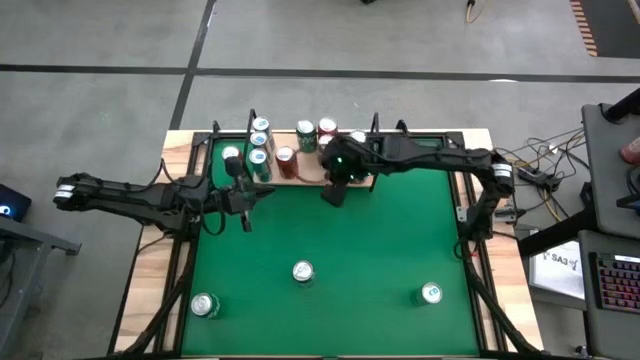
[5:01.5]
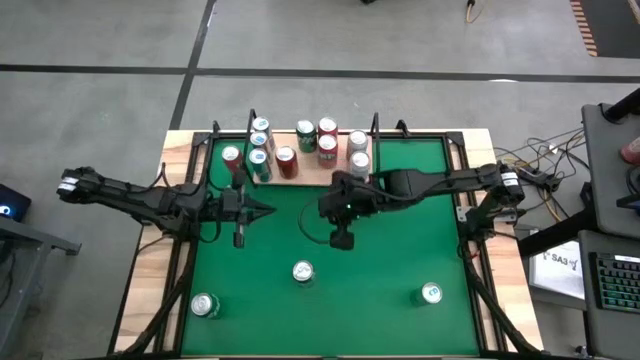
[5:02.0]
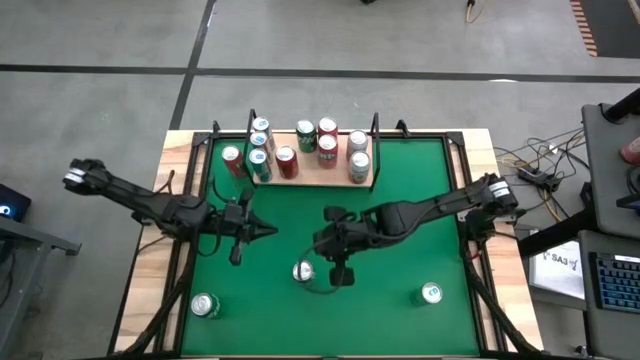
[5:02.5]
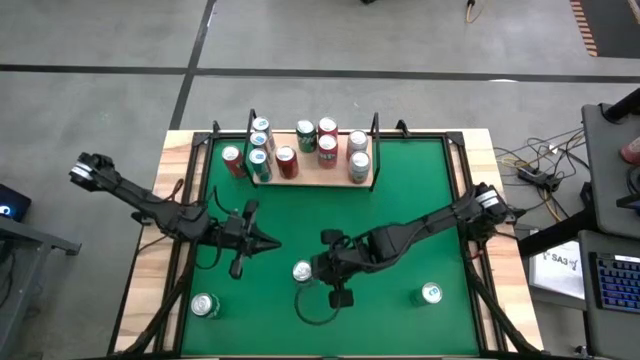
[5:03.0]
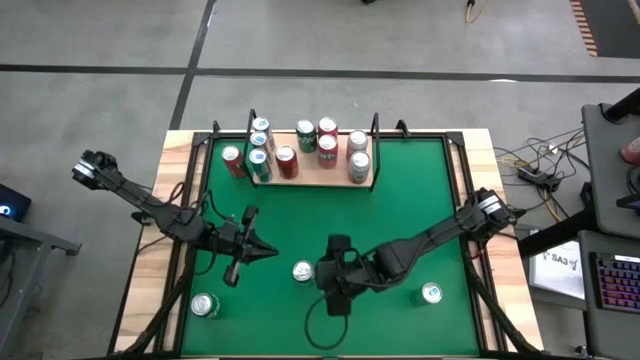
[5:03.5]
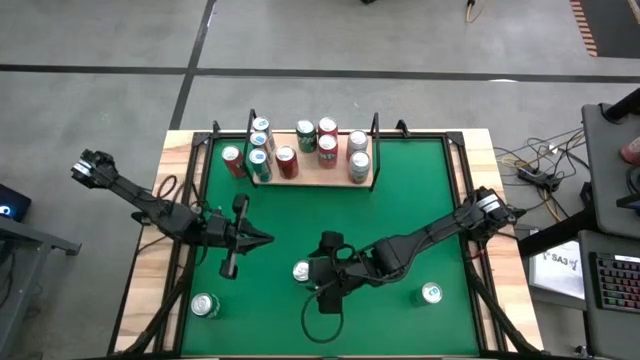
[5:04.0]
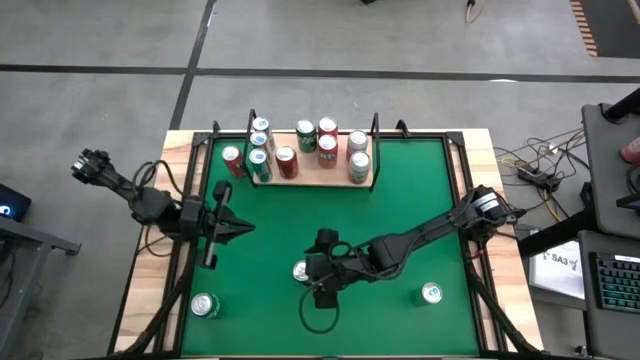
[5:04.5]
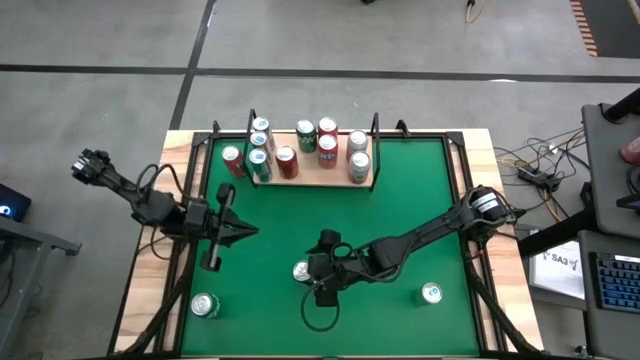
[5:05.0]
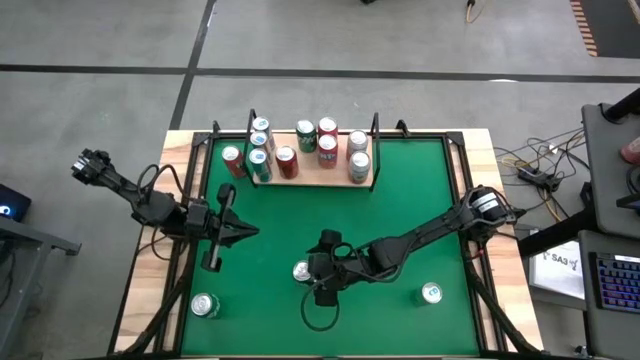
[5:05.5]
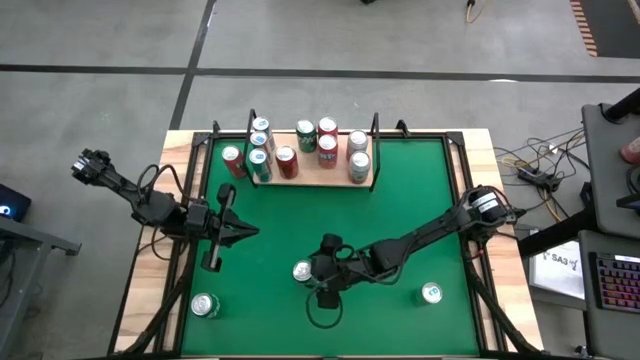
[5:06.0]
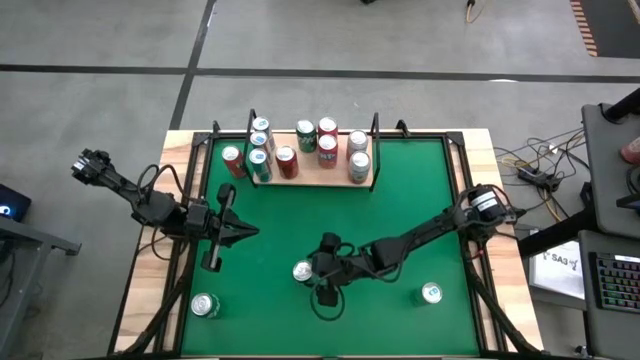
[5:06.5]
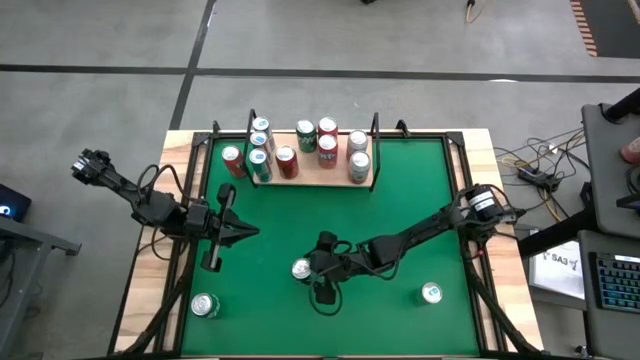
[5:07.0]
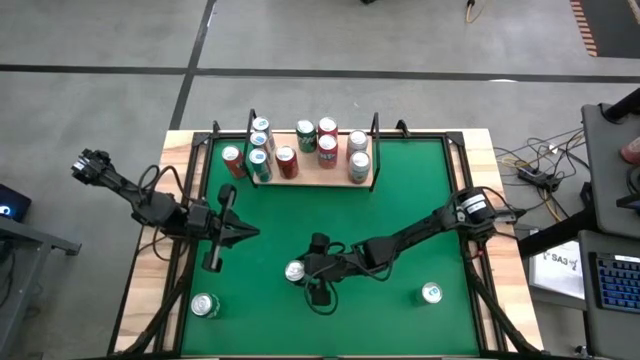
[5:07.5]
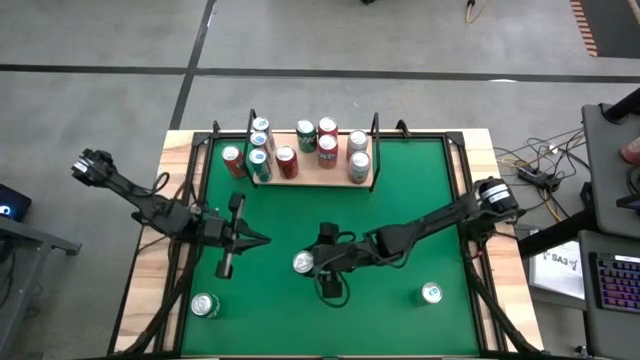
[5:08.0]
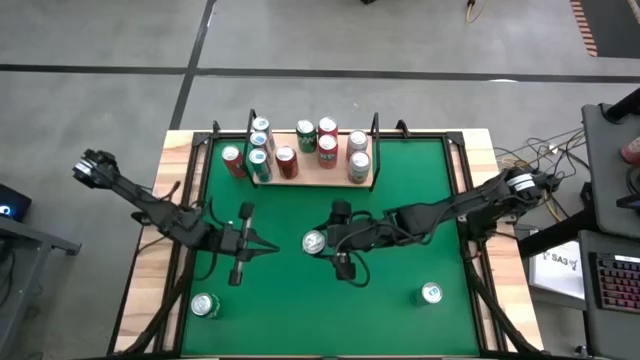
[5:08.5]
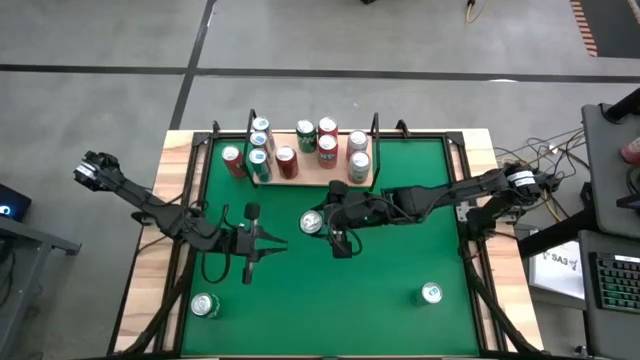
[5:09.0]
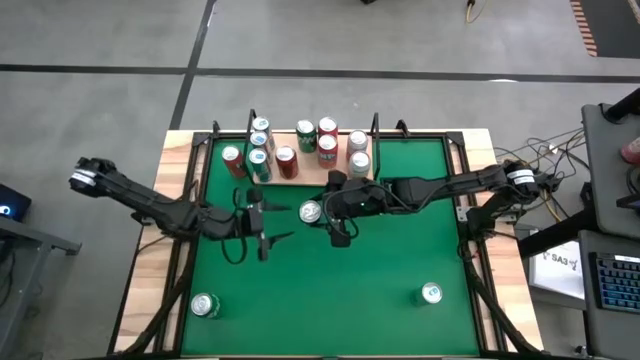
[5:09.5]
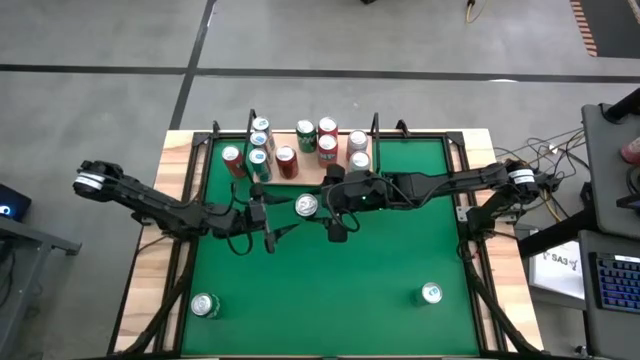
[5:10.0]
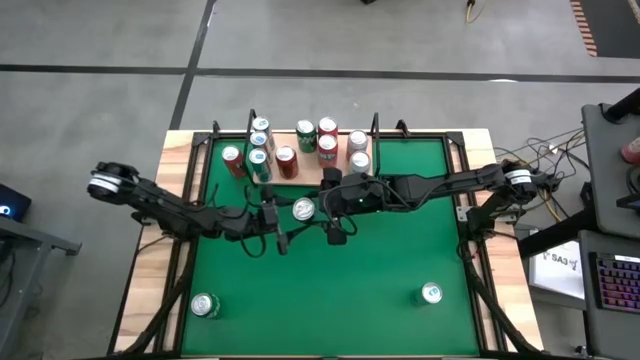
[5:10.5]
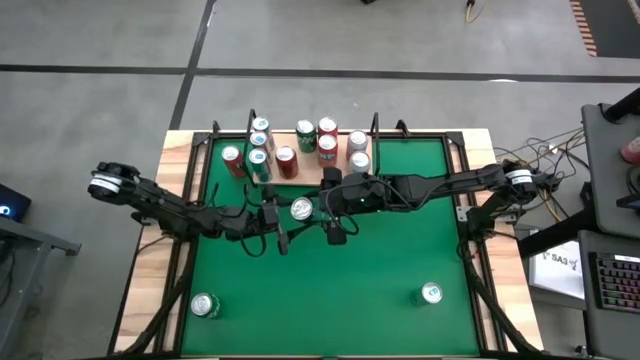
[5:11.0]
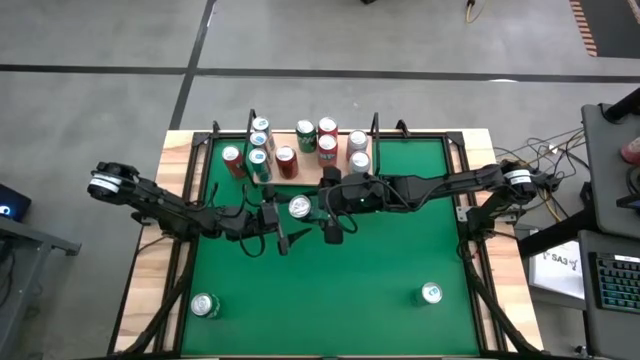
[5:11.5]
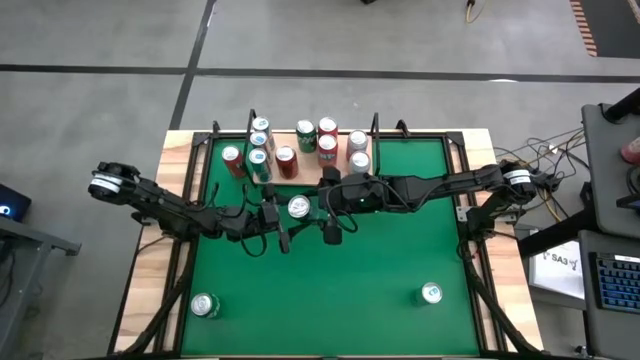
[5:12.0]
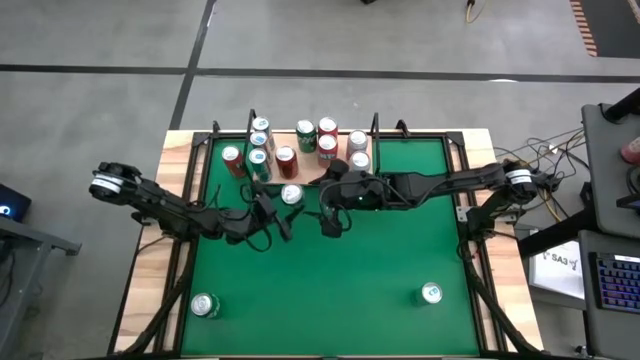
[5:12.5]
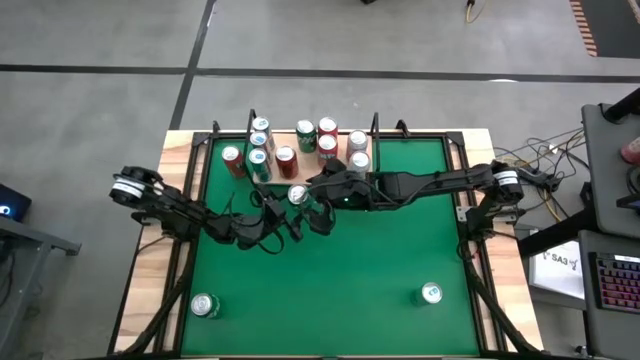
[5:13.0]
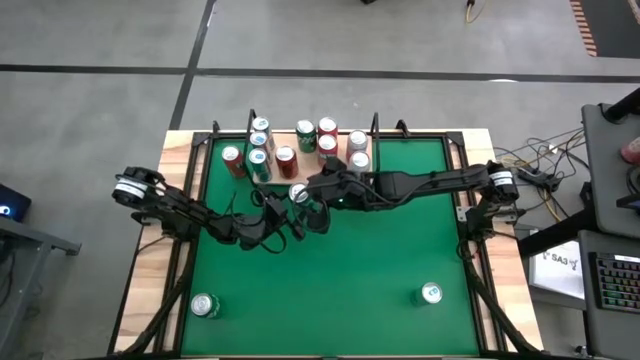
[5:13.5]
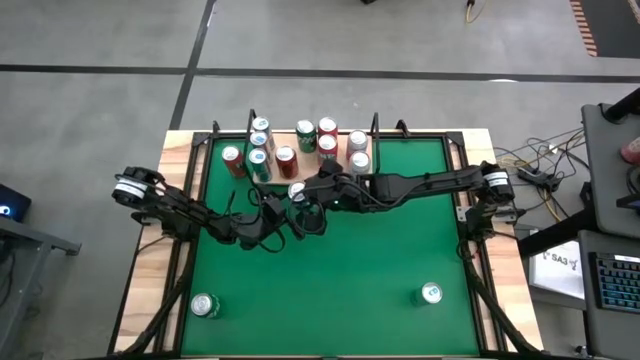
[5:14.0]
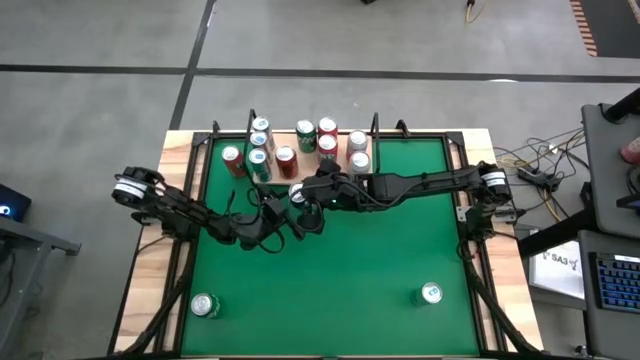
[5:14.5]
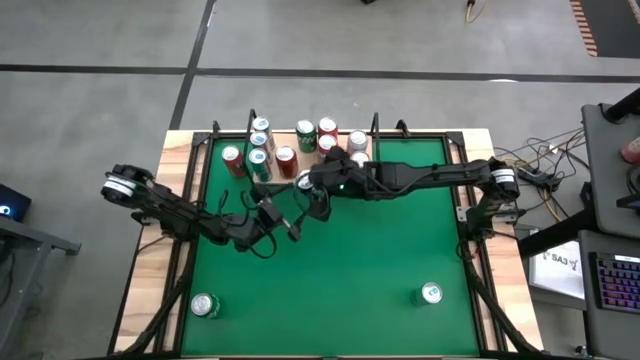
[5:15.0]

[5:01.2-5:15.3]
Task: Pick and place cans onto a shelf
Put the right green soda can on the shelf aligned with the other green soda can

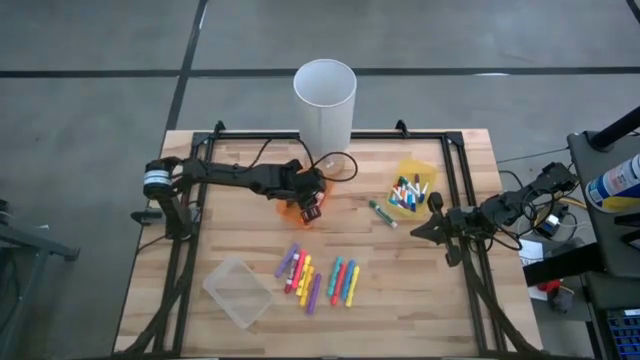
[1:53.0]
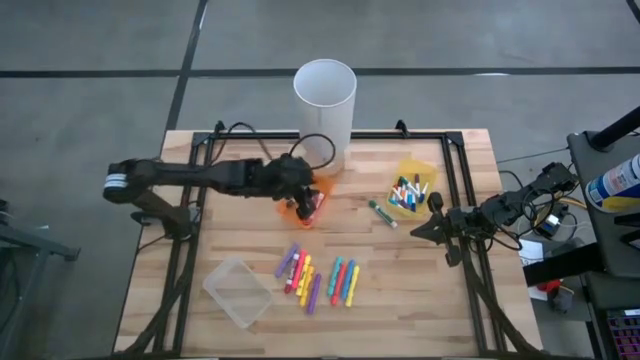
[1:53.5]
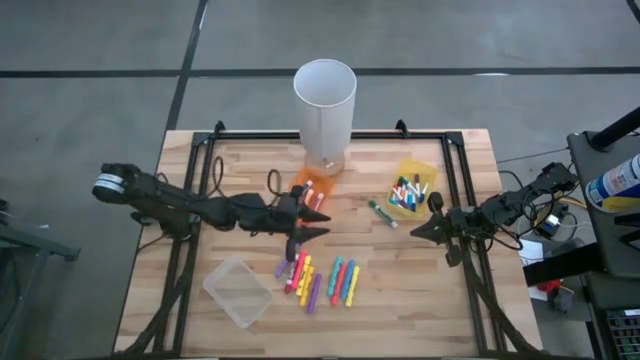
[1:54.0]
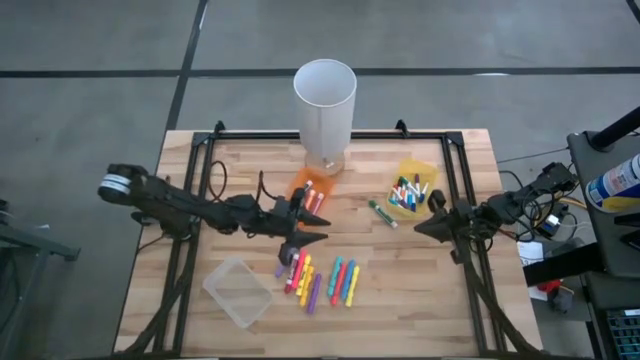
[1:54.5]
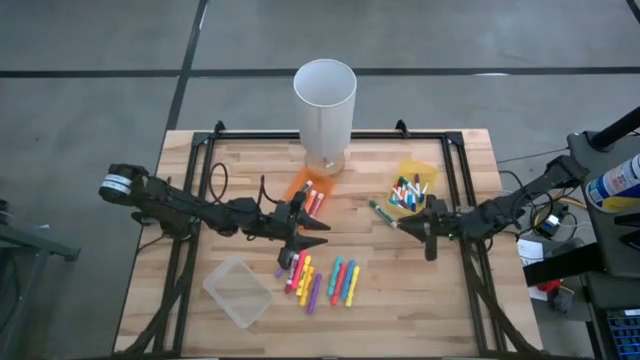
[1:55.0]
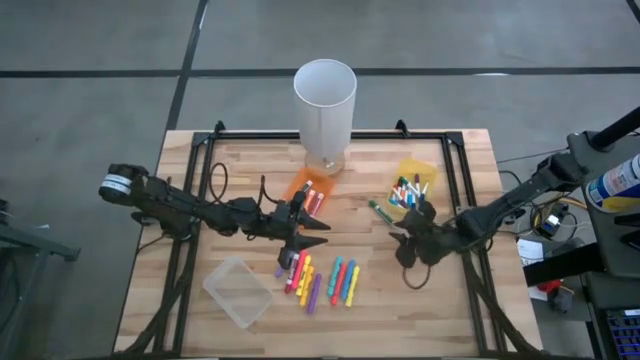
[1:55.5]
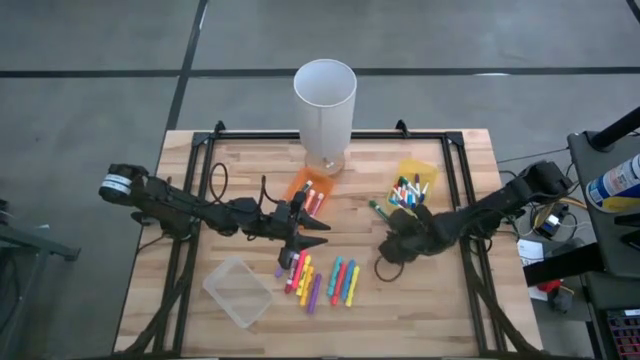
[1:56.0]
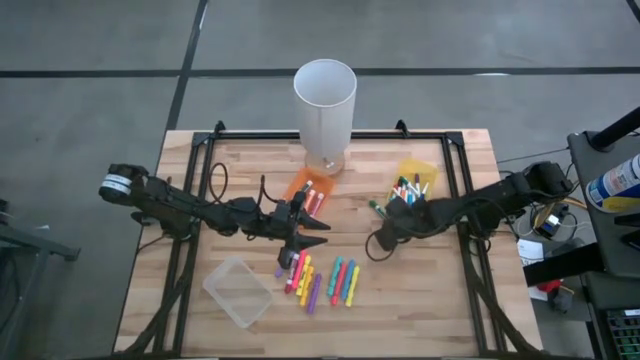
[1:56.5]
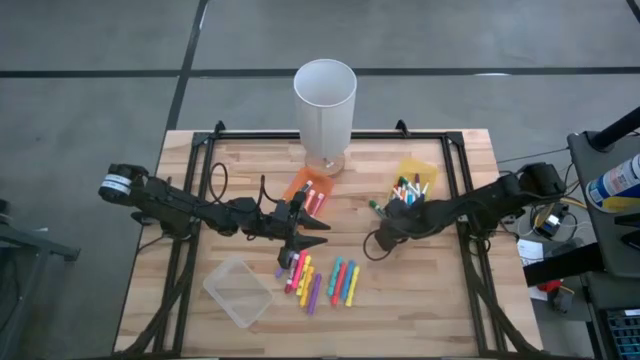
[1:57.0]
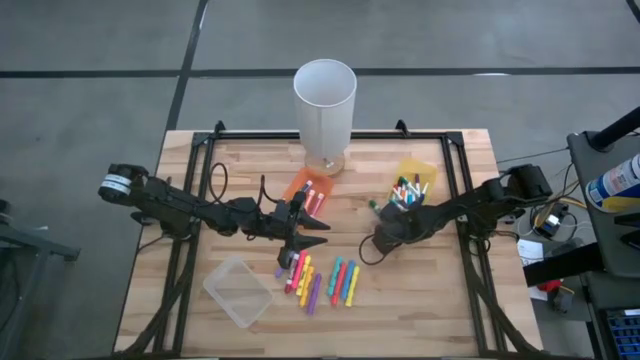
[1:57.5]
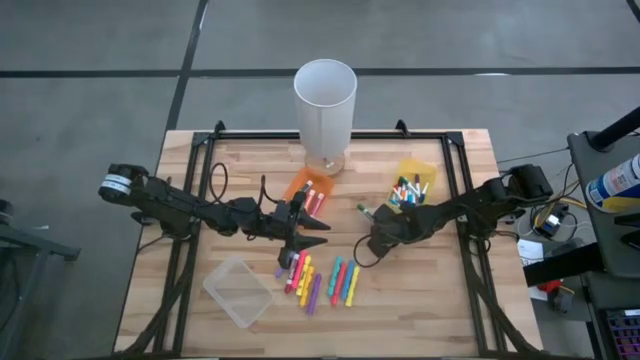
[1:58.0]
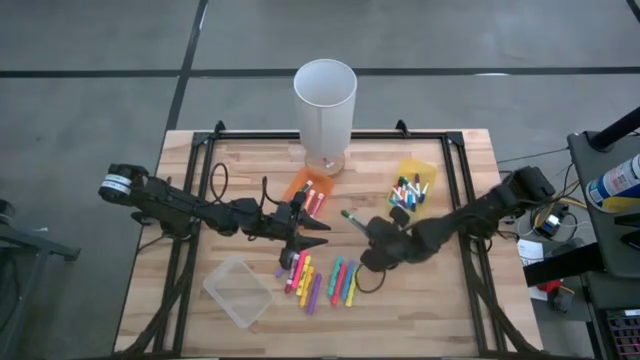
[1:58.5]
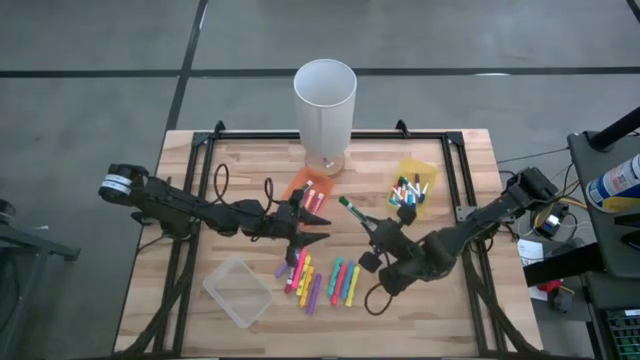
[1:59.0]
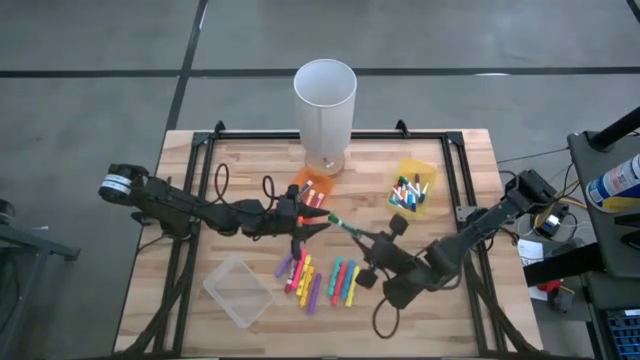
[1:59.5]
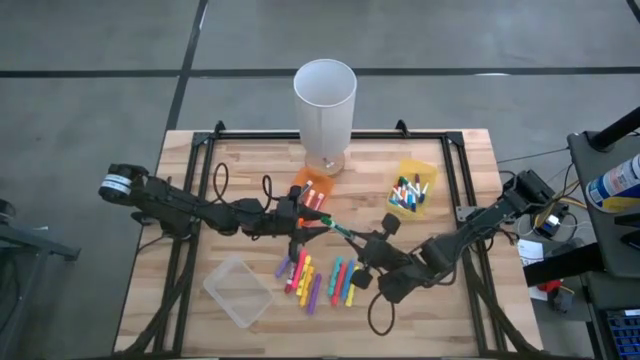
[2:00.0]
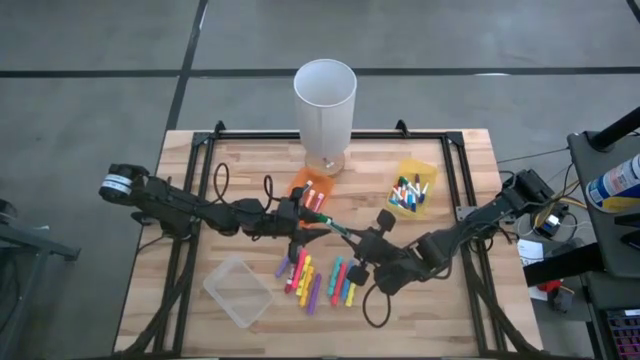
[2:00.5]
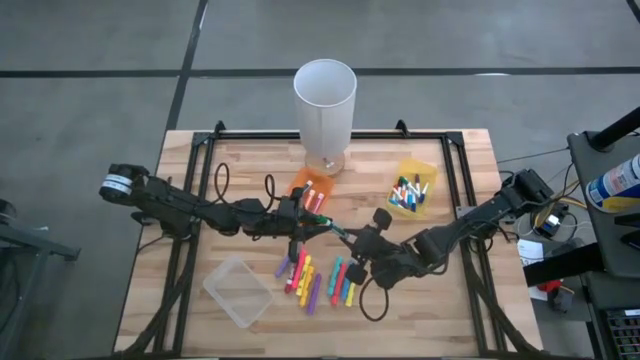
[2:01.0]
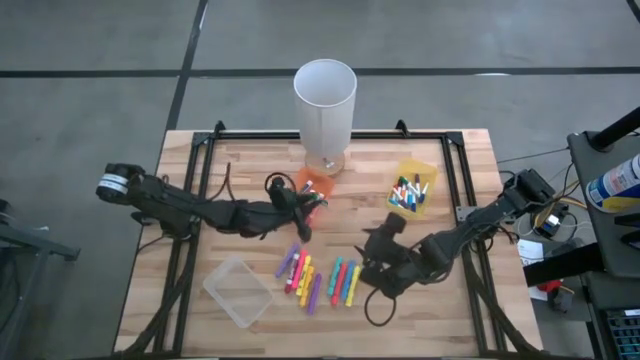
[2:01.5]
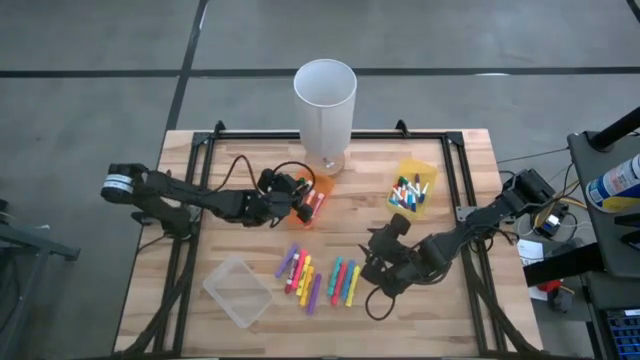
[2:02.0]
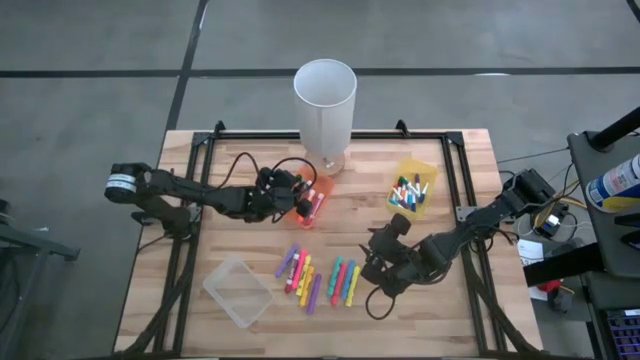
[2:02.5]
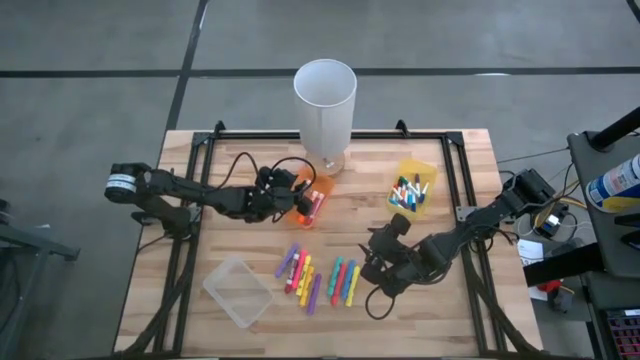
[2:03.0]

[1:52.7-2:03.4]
Task: Pick & Place Markers
Put the large green marker pen into the orange bin
